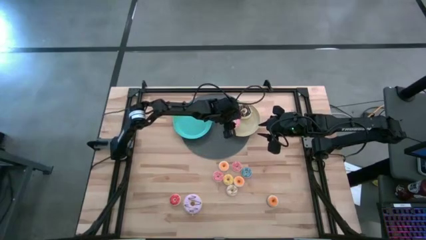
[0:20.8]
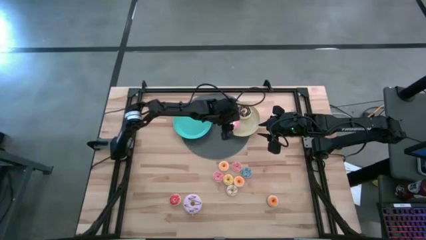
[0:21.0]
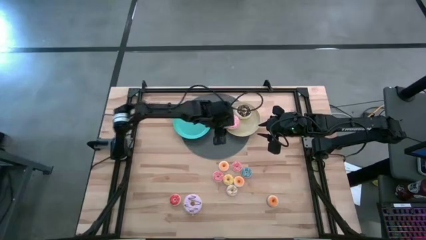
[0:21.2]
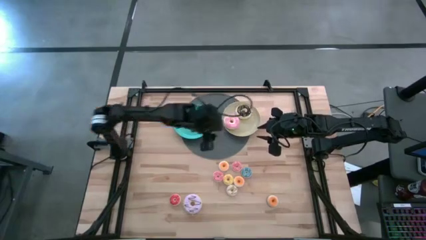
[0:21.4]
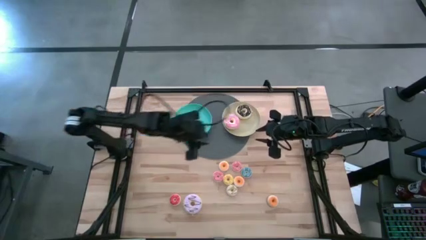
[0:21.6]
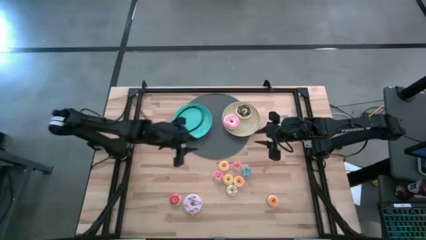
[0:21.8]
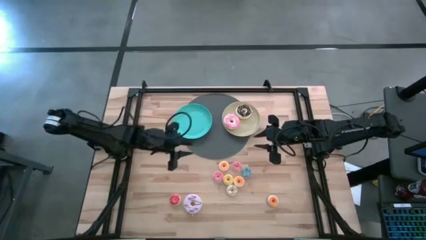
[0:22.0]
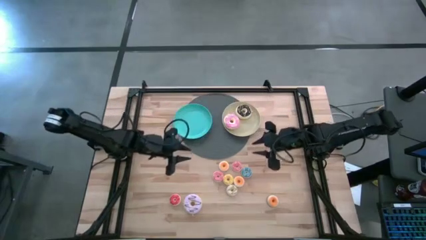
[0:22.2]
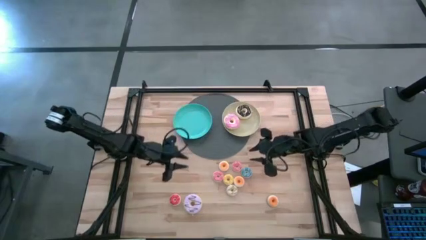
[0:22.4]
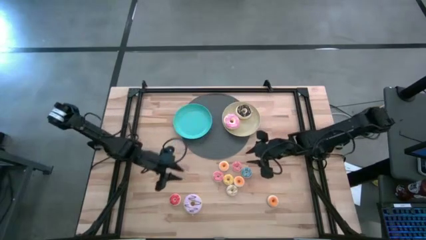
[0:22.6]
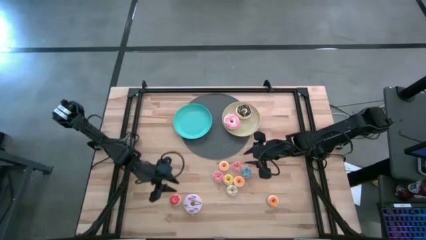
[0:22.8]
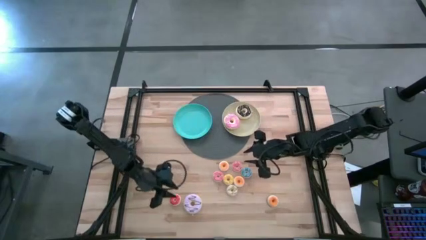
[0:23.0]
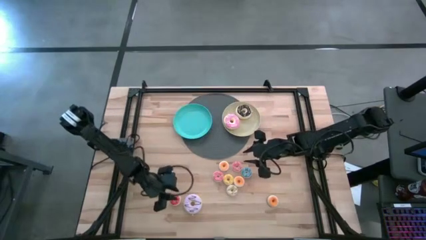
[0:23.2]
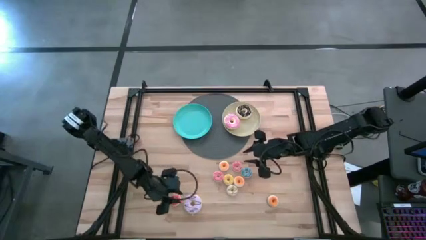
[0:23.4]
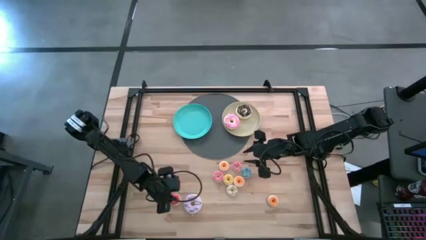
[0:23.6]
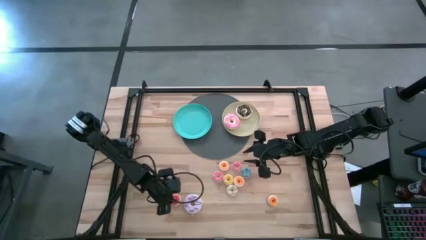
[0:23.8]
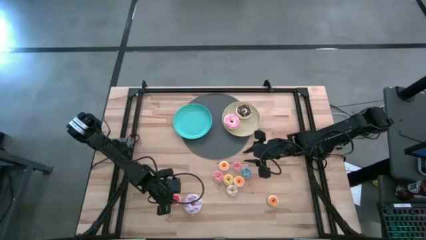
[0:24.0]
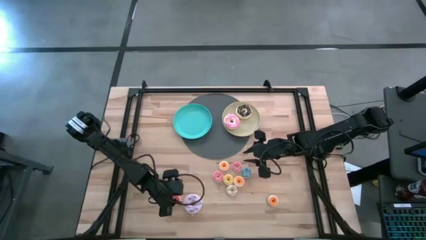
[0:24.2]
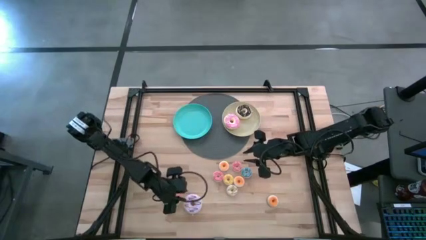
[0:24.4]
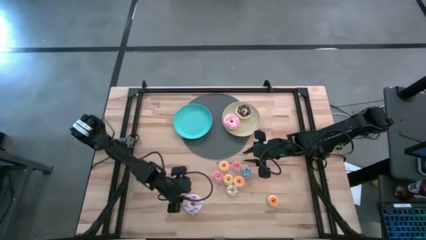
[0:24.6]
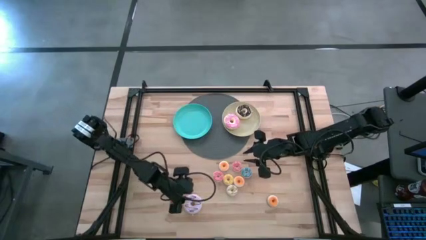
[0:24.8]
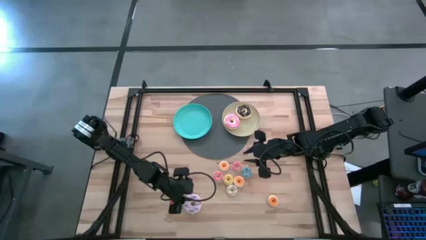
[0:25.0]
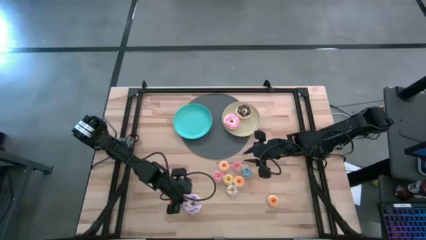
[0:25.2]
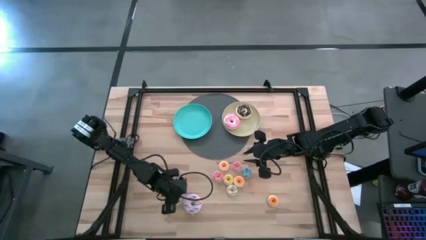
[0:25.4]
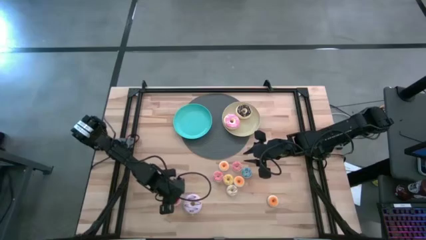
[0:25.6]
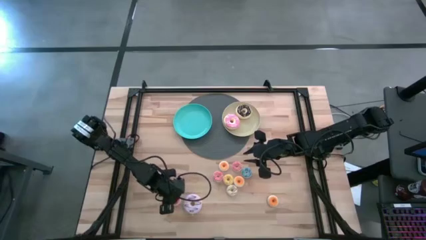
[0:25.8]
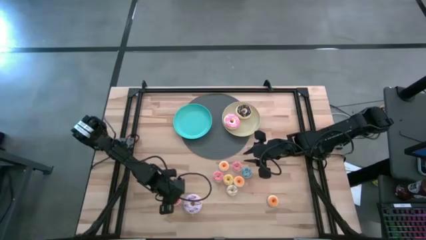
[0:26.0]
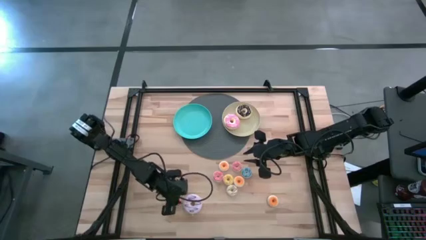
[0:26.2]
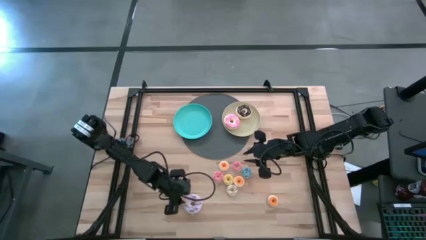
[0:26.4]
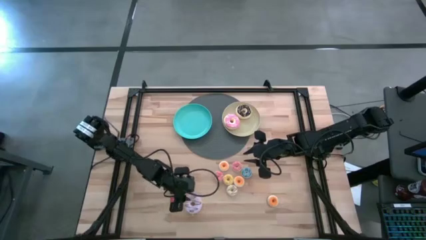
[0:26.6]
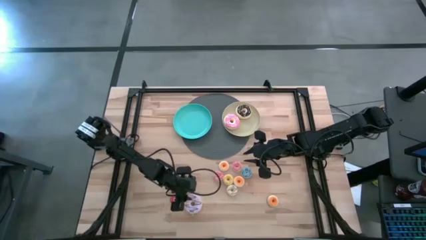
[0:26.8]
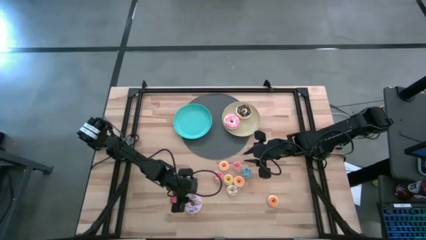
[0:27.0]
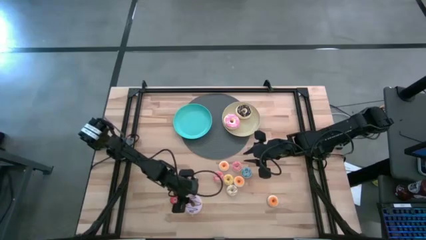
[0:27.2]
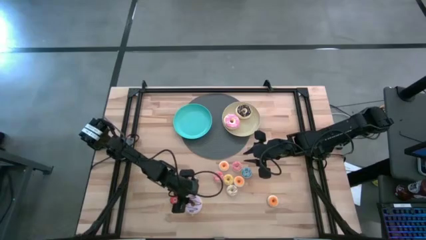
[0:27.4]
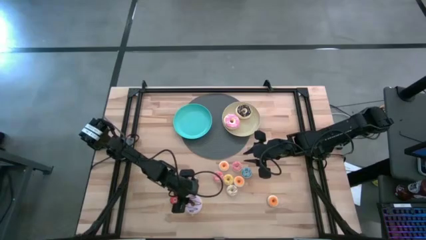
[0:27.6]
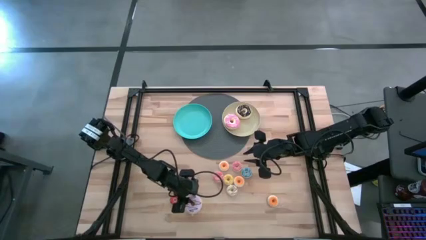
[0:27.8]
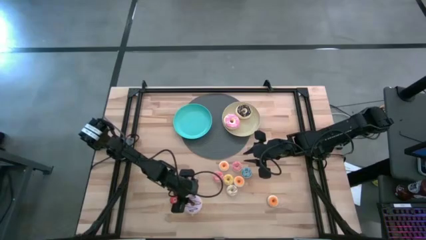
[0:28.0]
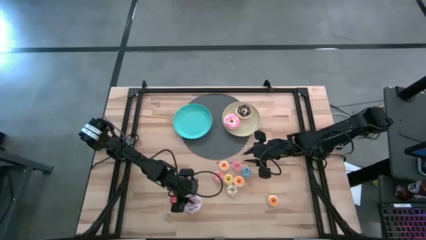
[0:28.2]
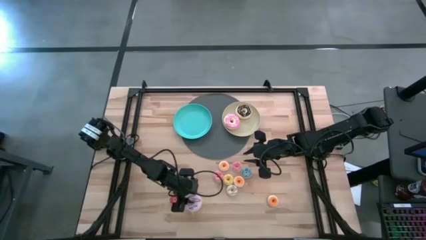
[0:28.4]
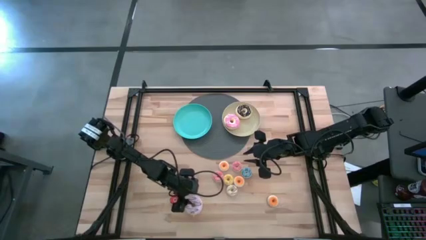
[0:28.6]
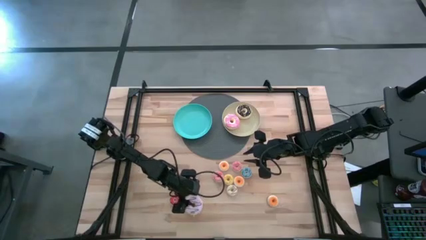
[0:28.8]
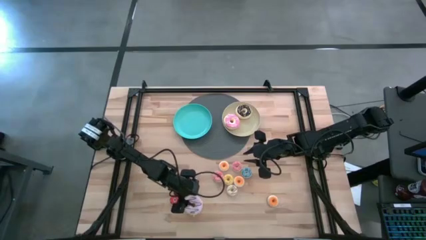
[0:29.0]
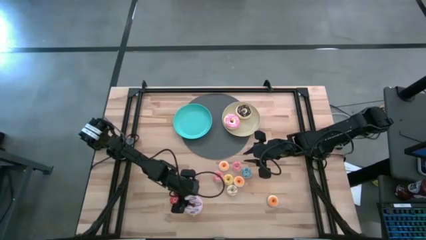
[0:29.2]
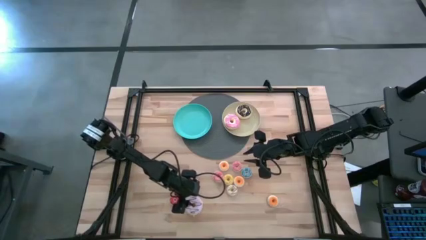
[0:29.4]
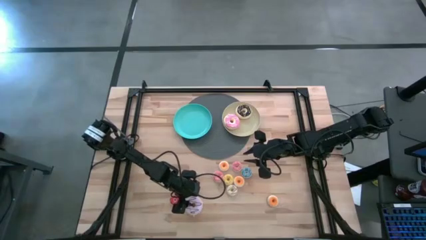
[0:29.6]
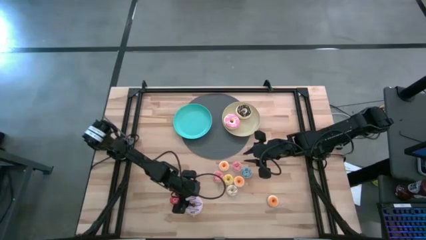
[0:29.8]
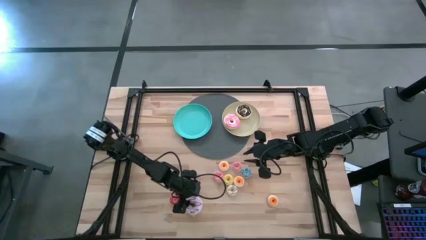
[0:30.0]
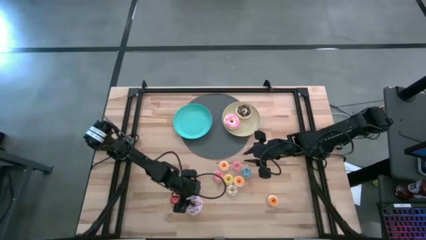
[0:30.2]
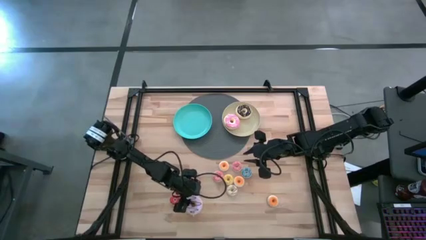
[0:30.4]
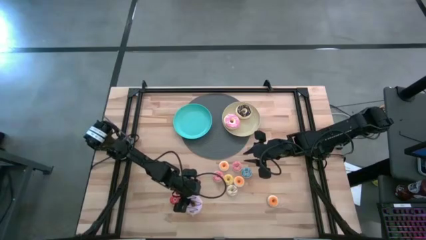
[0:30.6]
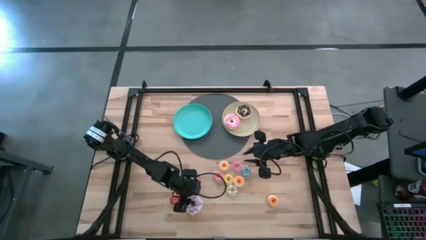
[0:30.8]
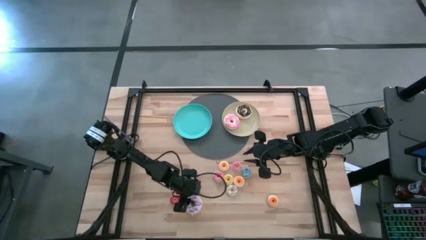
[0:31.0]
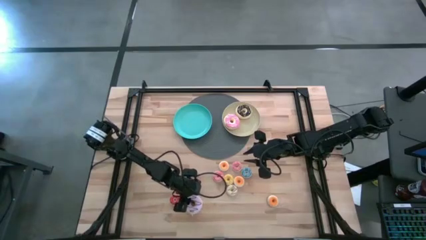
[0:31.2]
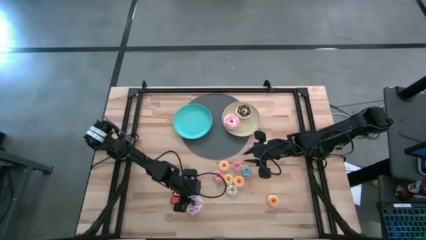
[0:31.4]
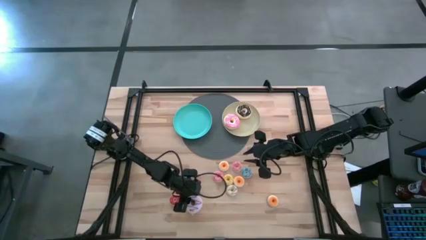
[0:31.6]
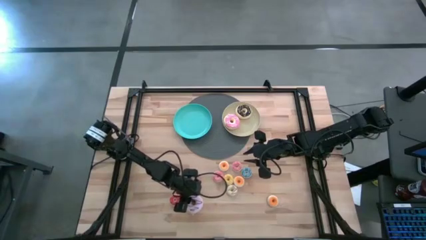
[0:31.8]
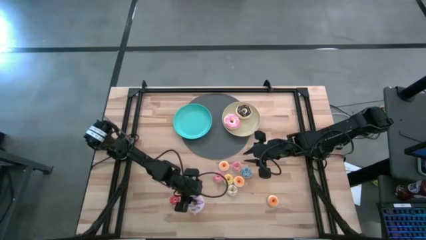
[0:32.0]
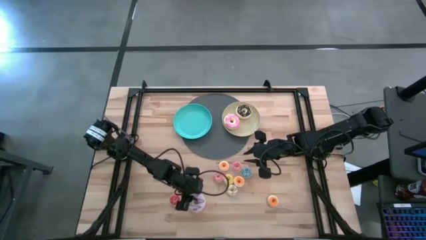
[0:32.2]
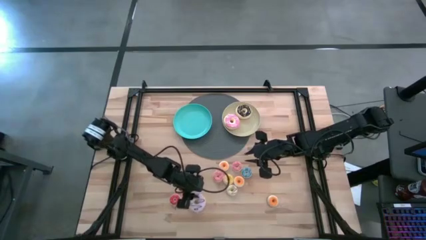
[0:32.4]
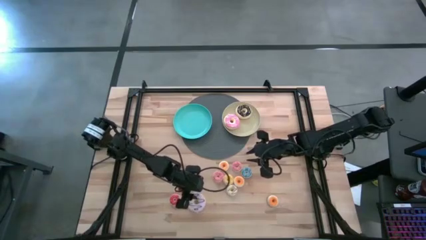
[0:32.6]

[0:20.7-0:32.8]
Task: Pick & Place donuts
Put the large purple donut on the brown plate

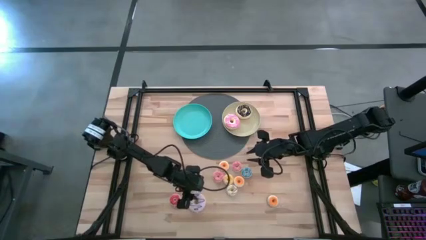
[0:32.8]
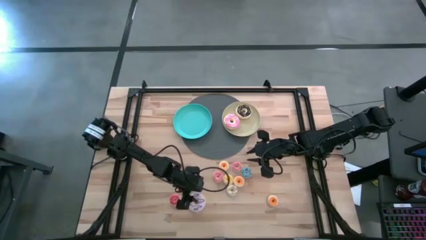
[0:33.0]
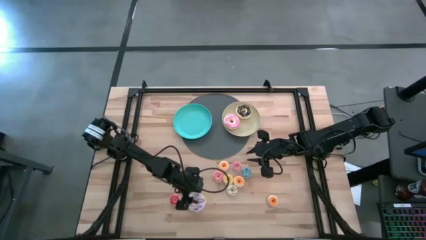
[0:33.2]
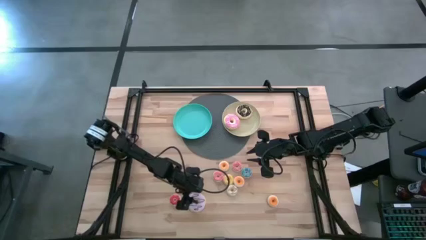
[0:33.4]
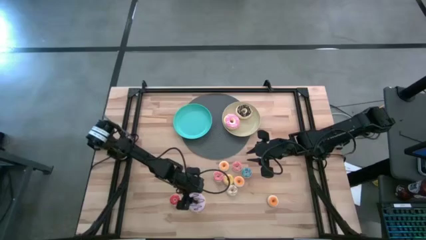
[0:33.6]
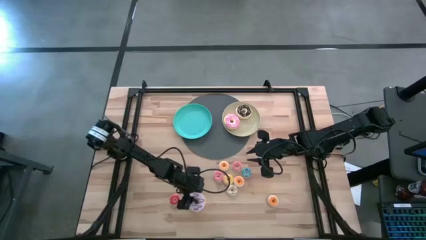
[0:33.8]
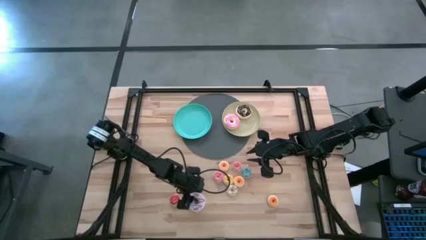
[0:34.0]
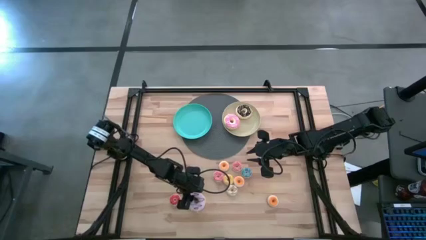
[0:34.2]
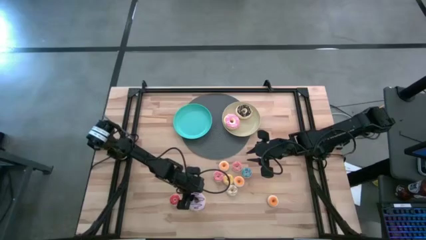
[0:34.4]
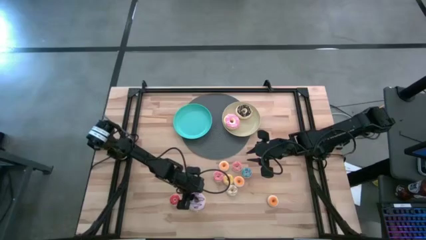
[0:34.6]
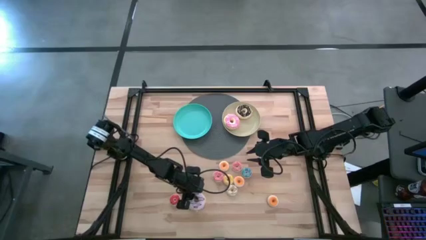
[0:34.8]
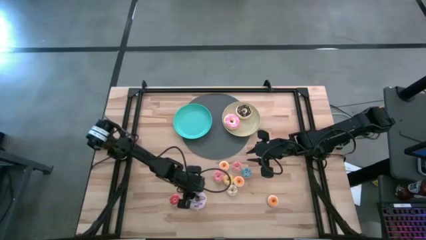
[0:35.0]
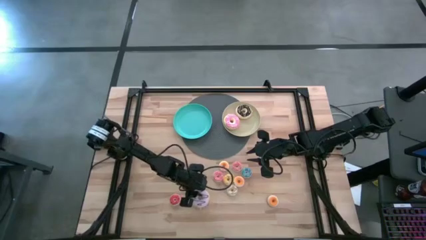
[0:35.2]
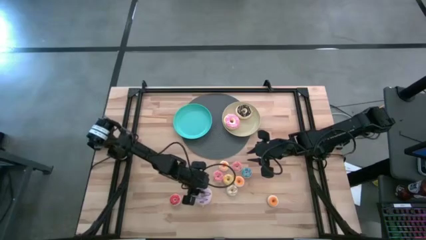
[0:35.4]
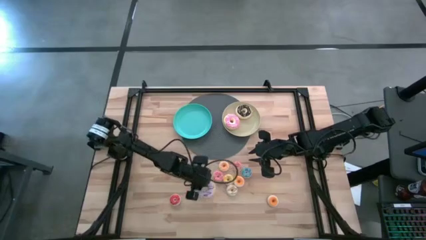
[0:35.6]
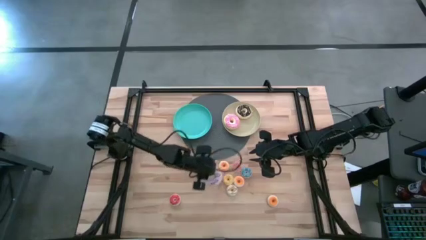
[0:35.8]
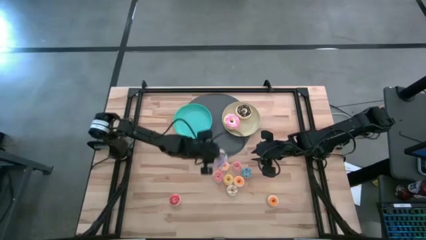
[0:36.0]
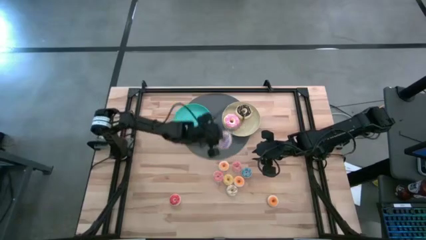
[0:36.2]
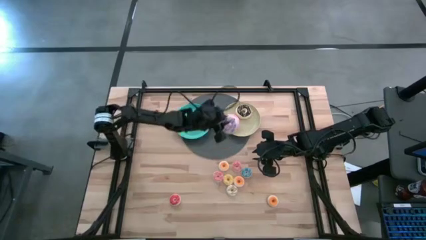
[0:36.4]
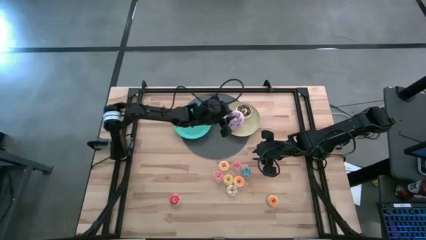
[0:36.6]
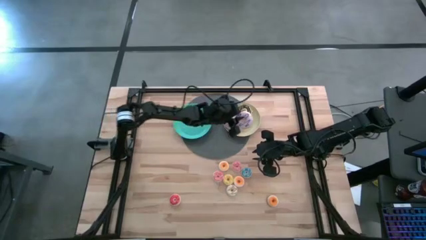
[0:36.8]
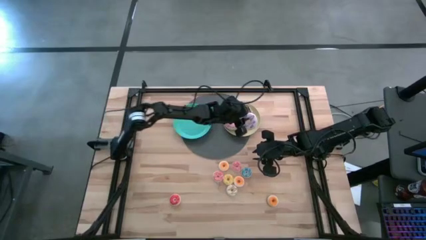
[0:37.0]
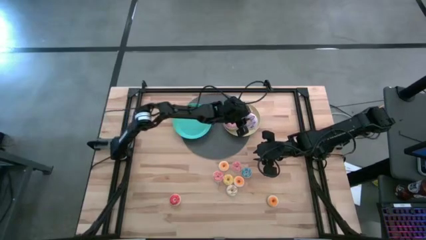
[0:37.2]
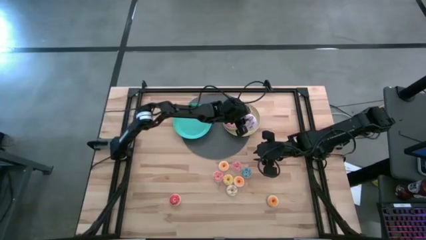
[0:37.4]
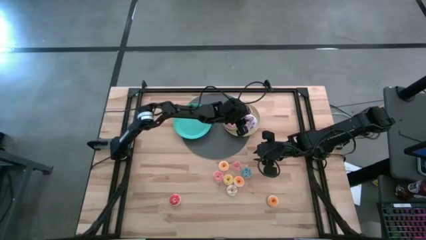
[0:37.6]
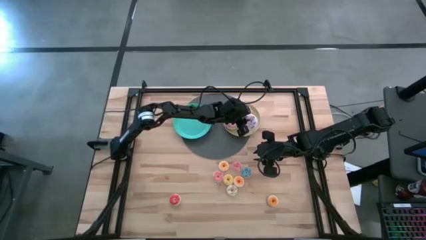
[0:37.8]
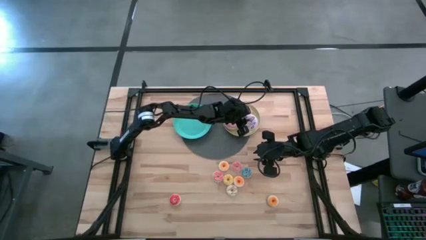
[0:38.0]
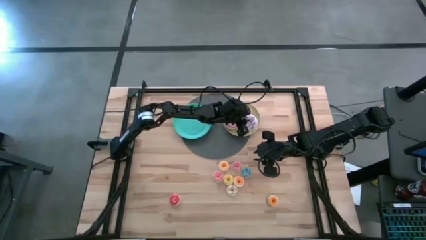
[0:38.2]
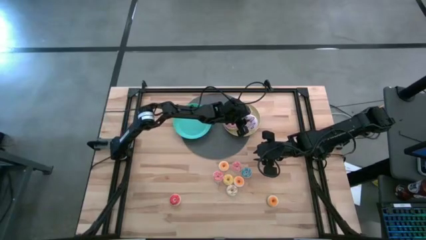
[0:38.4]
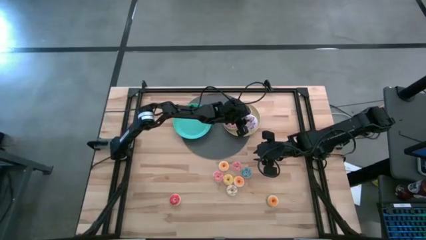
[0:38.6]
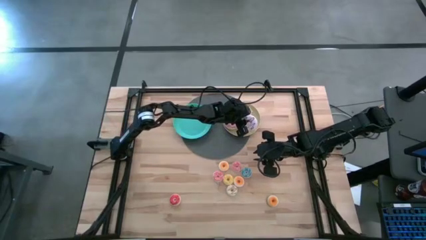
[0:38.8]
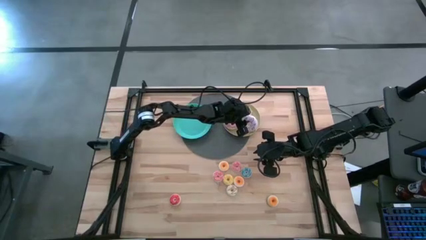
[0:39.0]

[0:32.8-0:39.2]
Put the large purple donut on the brown plate
